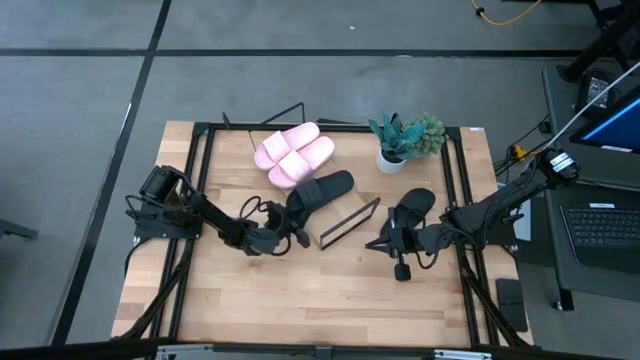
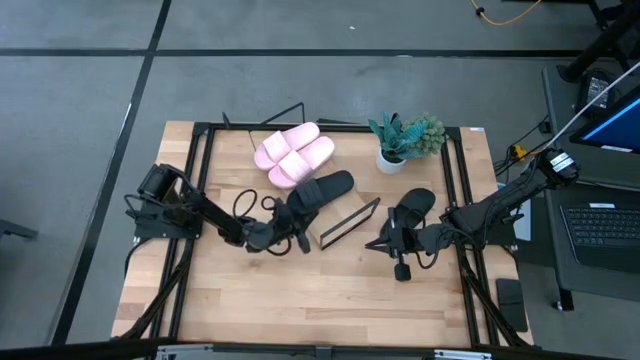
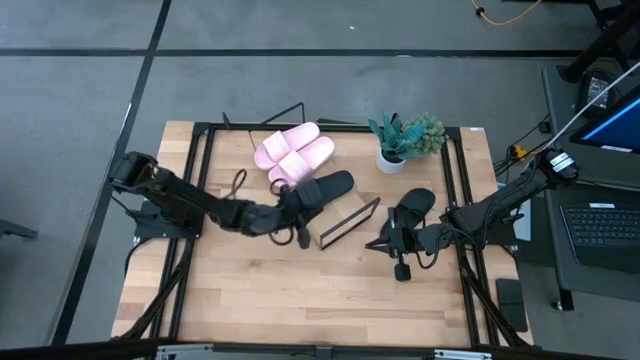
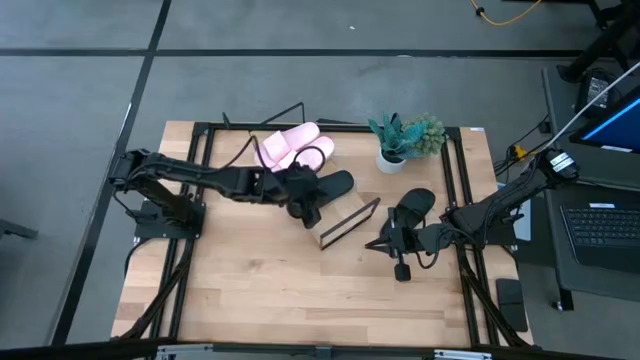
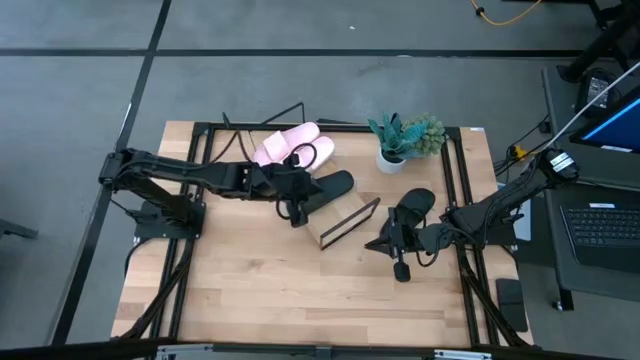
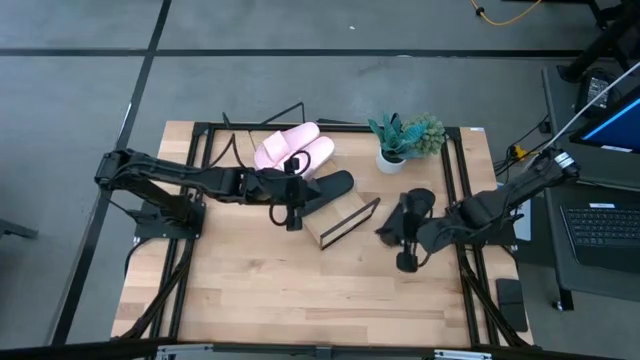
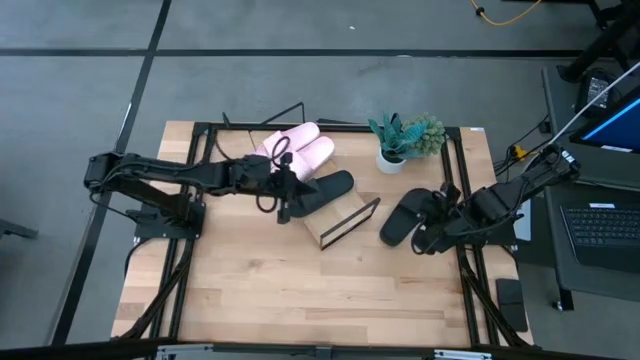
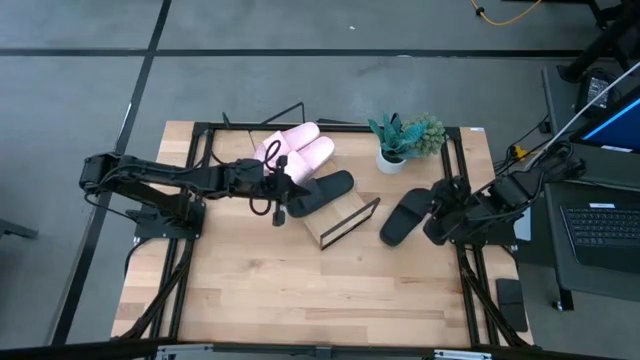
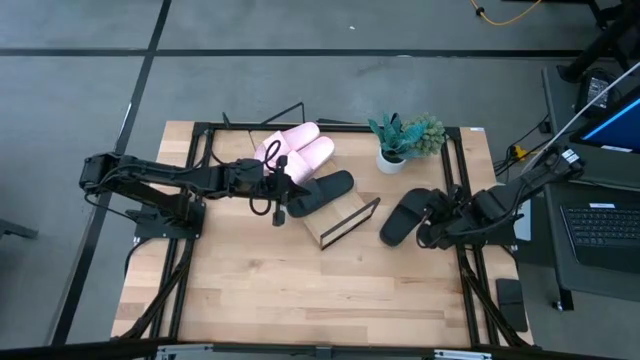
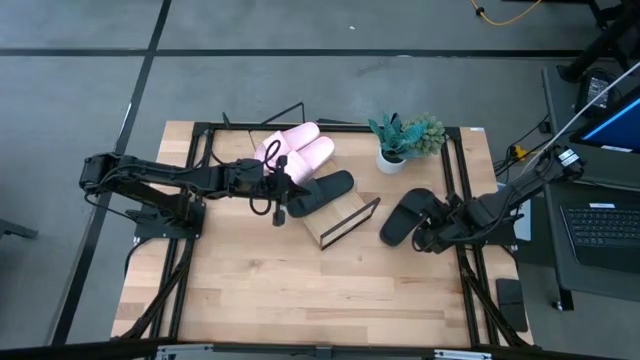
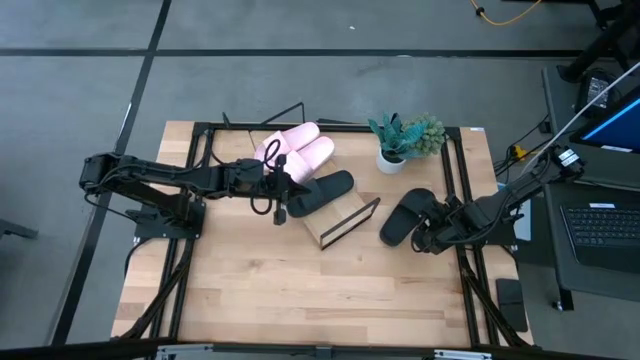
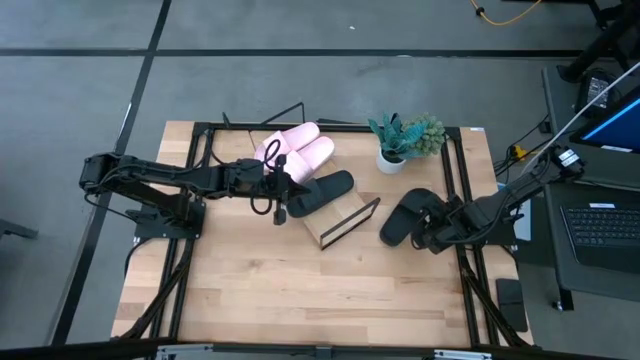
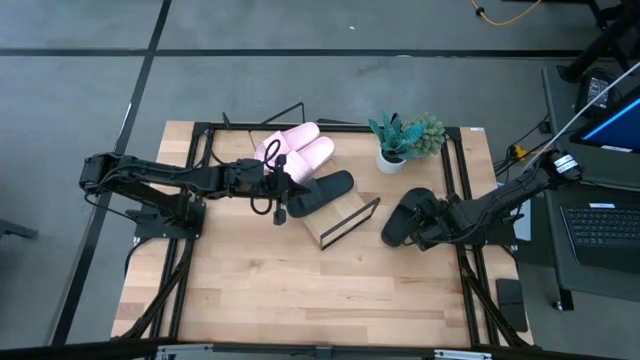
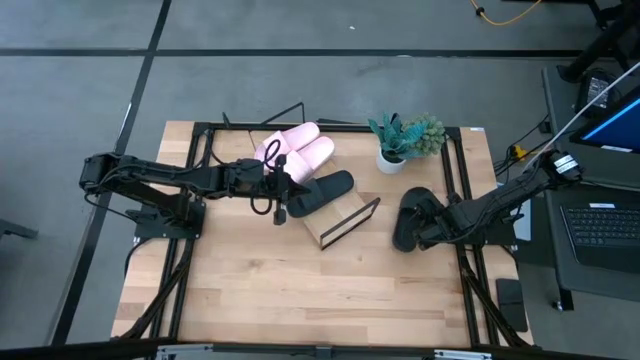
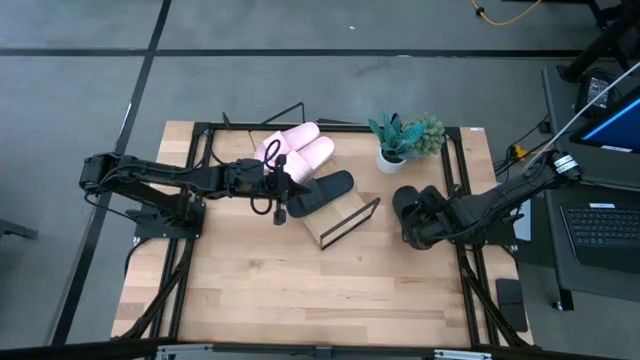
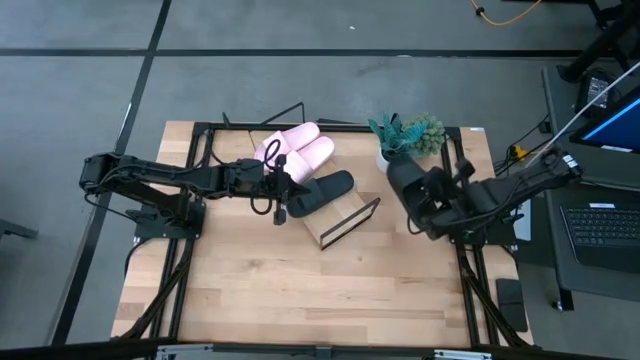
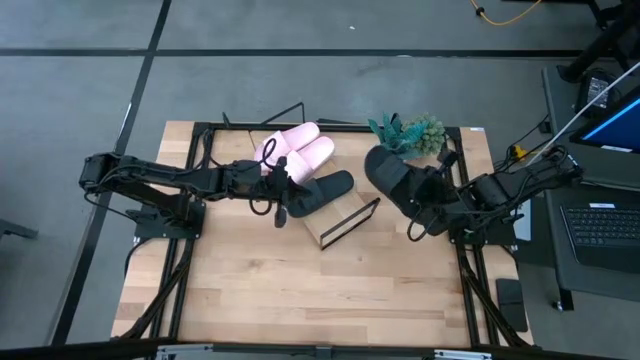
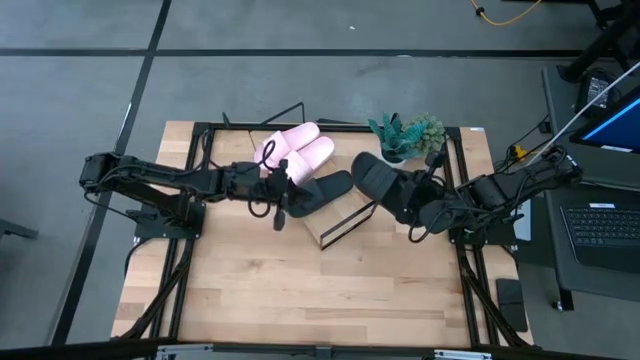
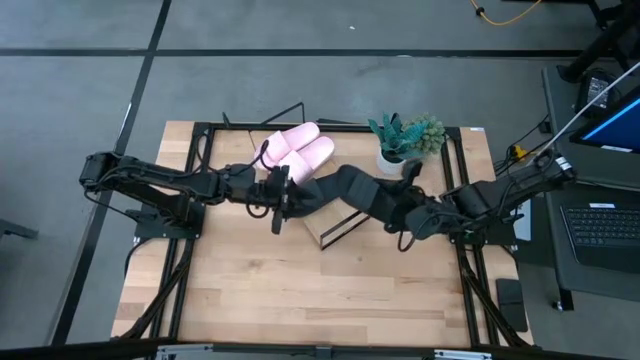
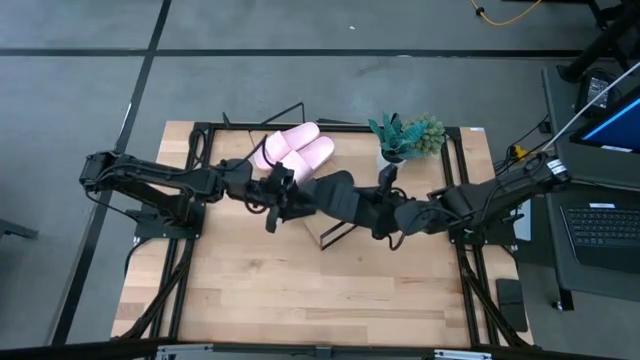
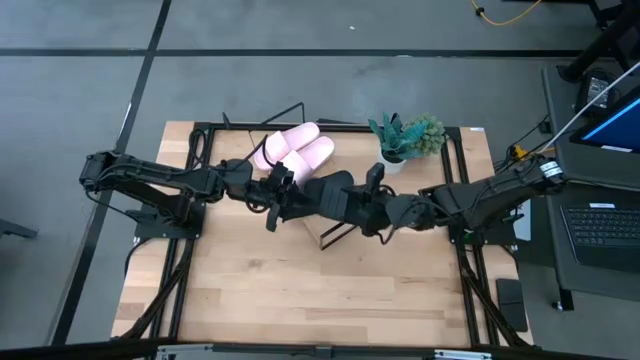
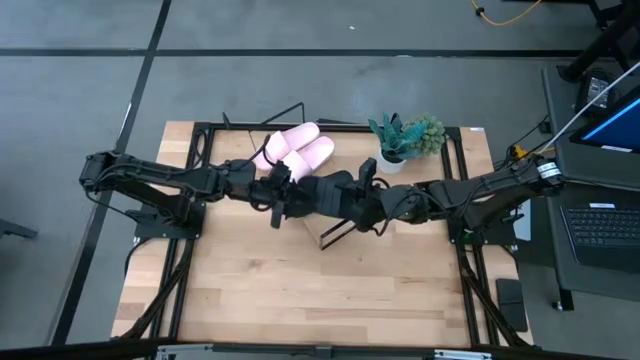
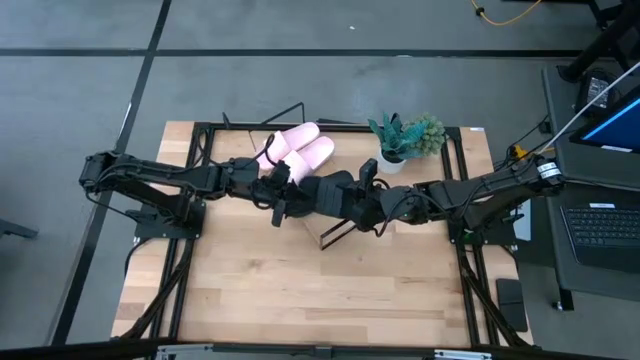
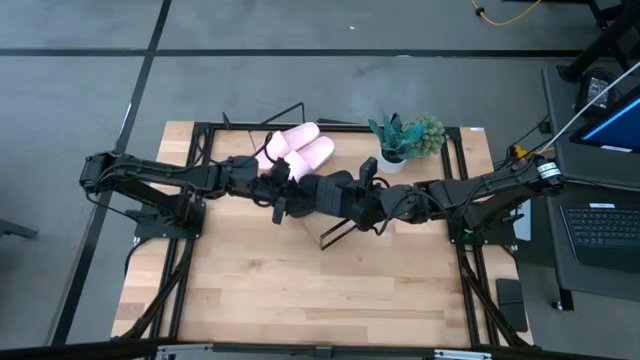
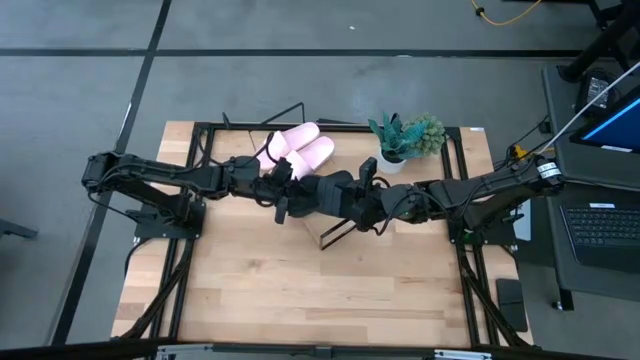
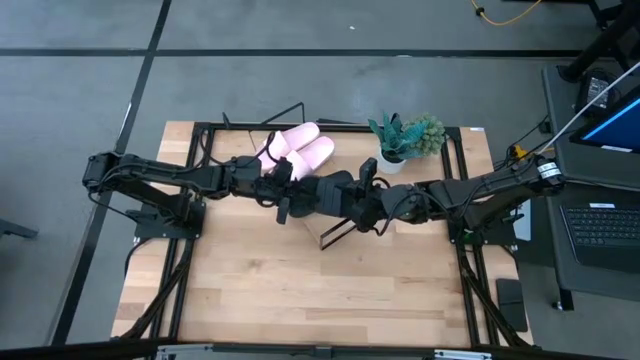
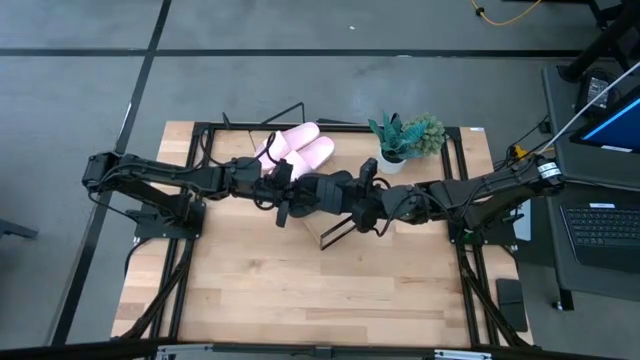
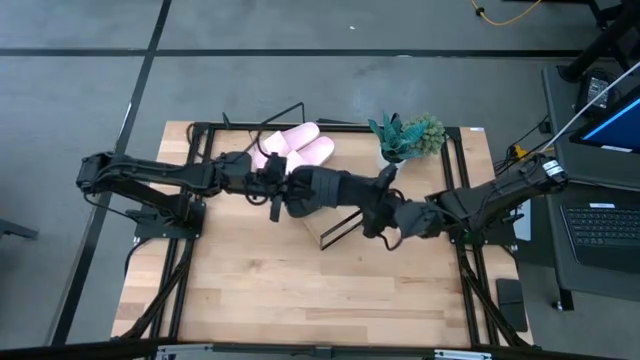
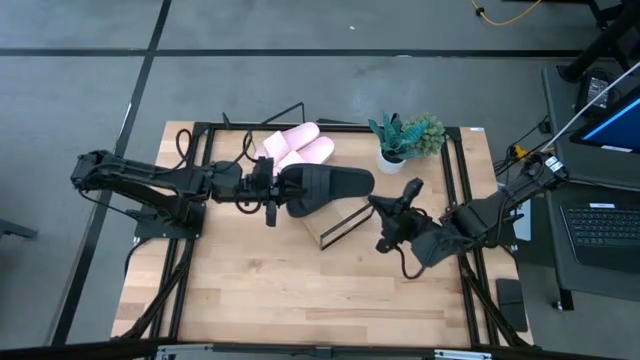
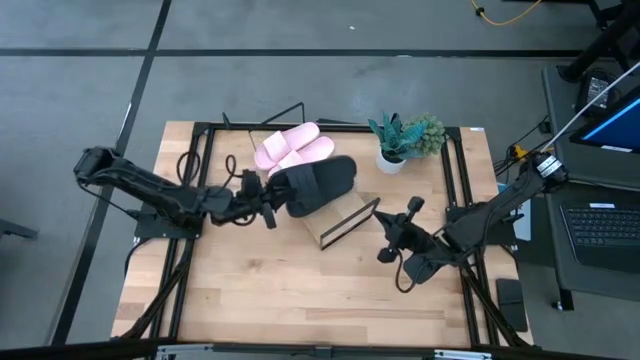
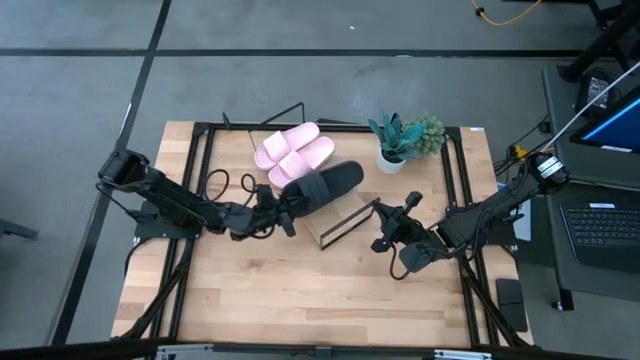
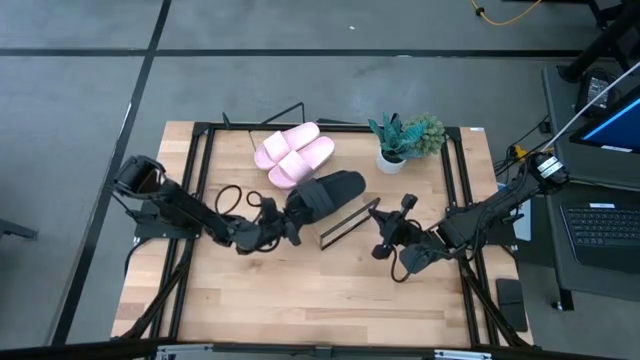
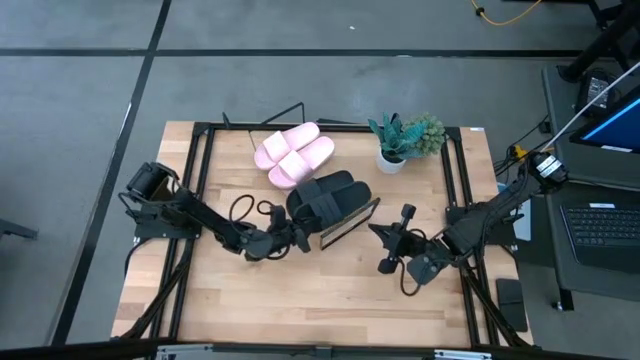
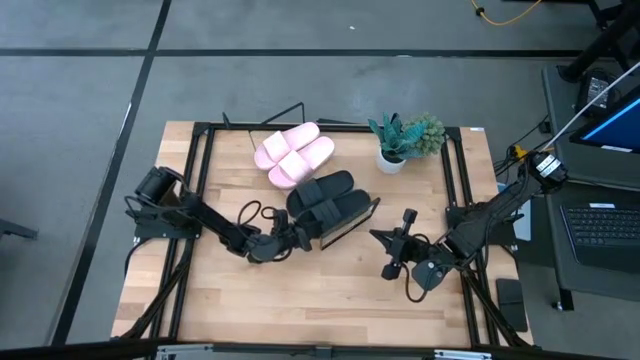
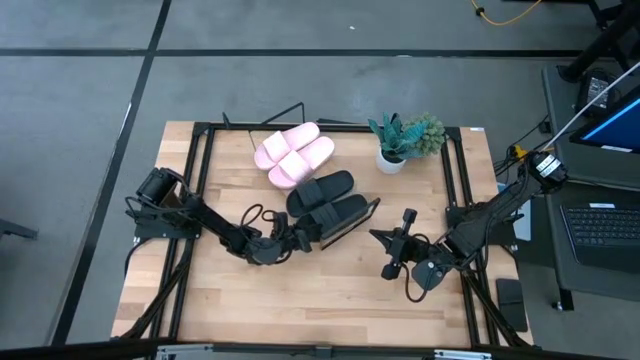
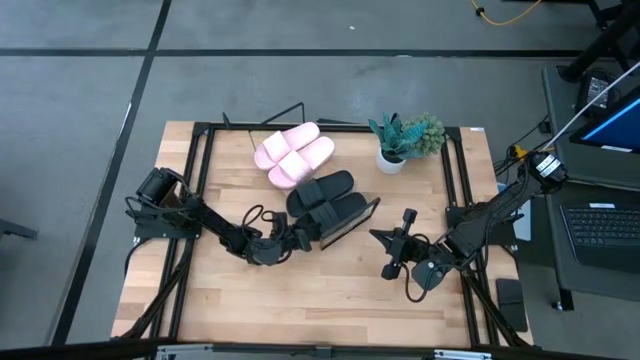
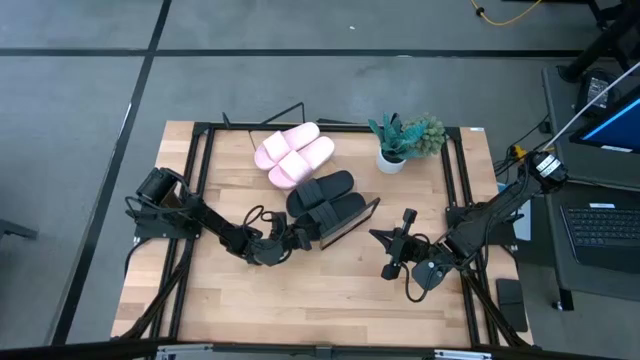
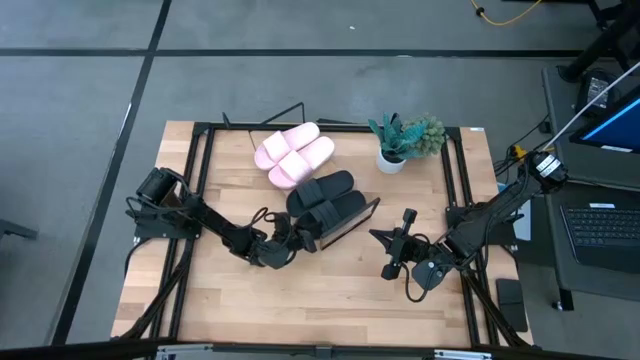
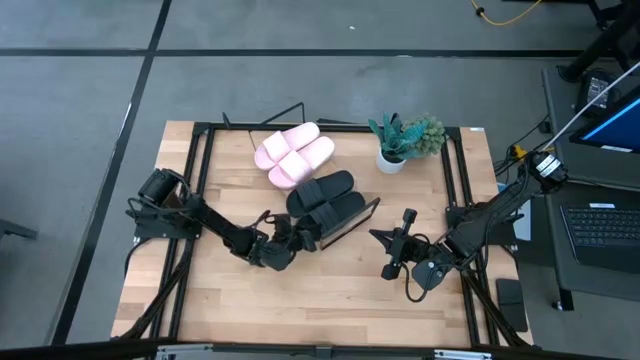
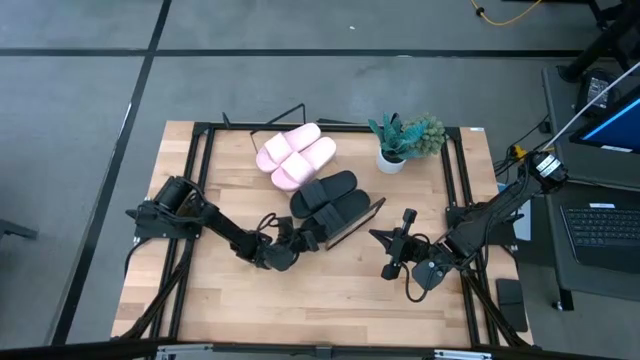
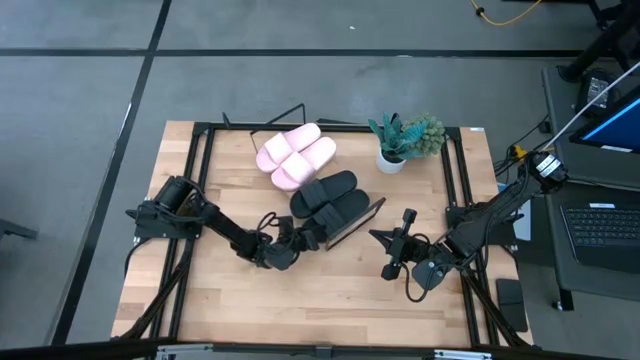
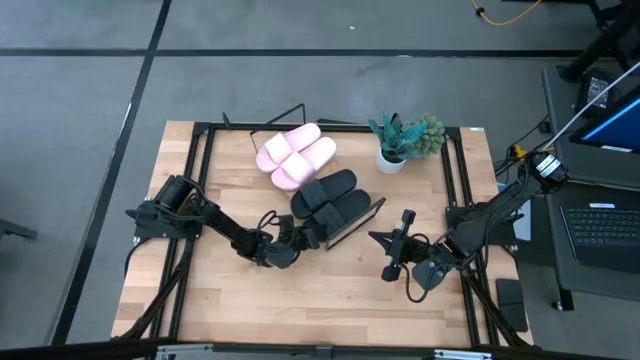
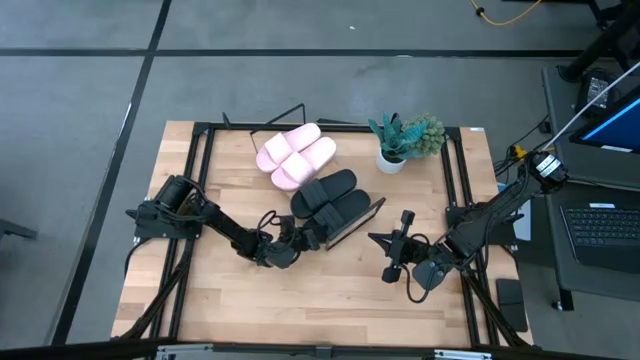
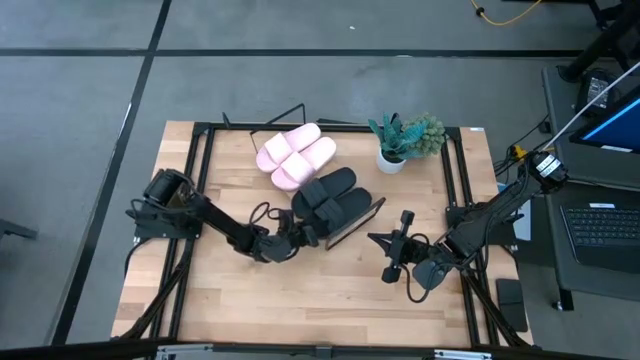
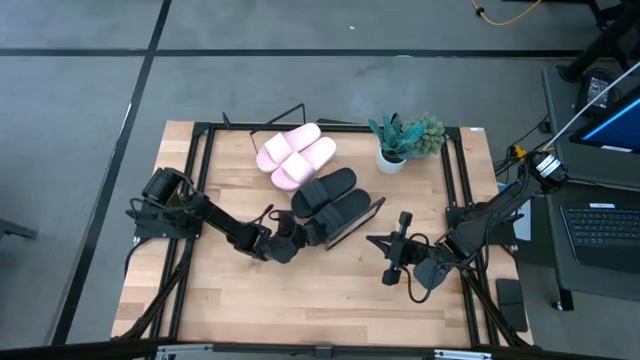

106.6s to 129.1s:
Task: Pick and place slides into the shelf
Put the black slides on the shelf
